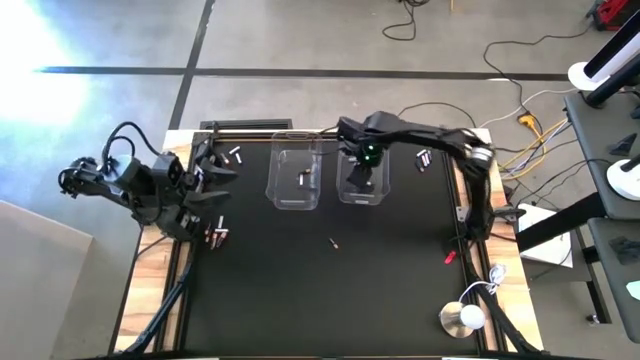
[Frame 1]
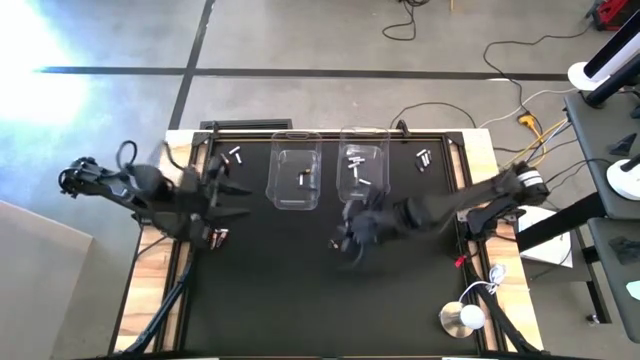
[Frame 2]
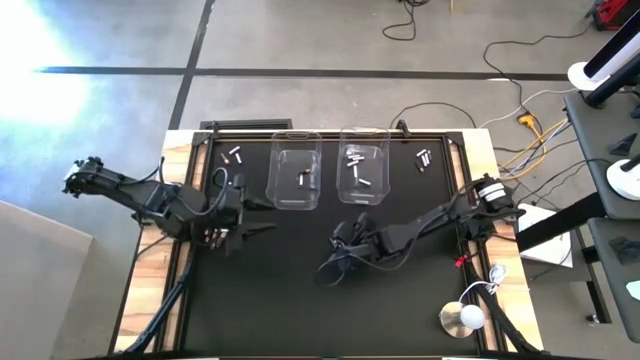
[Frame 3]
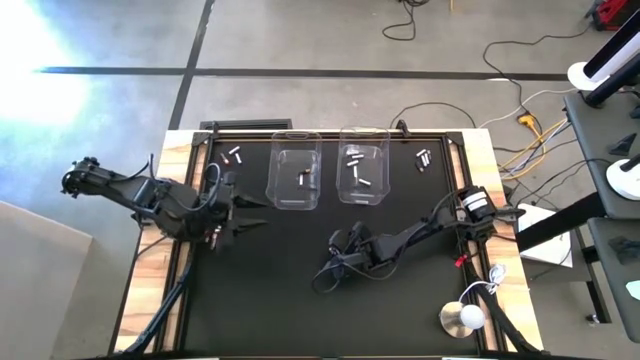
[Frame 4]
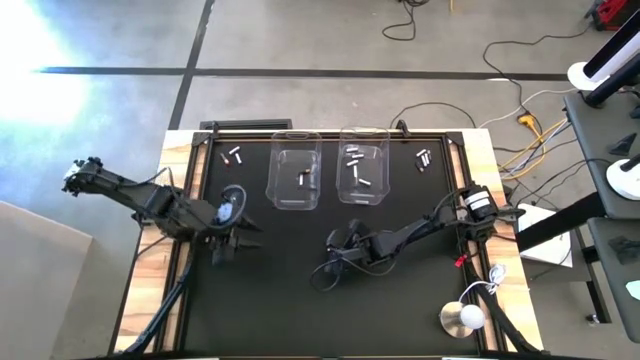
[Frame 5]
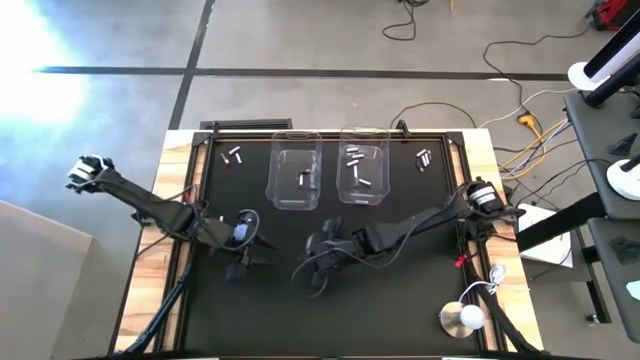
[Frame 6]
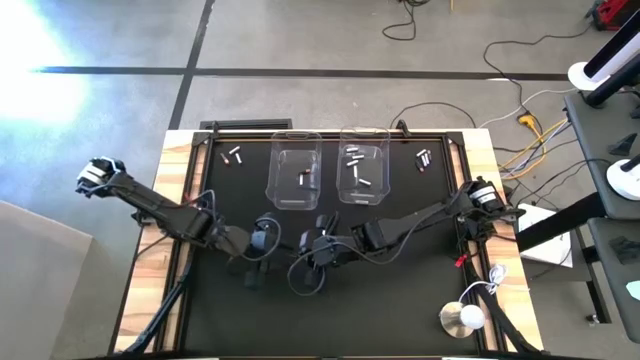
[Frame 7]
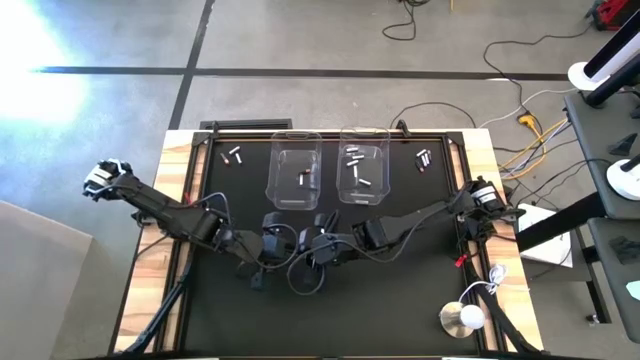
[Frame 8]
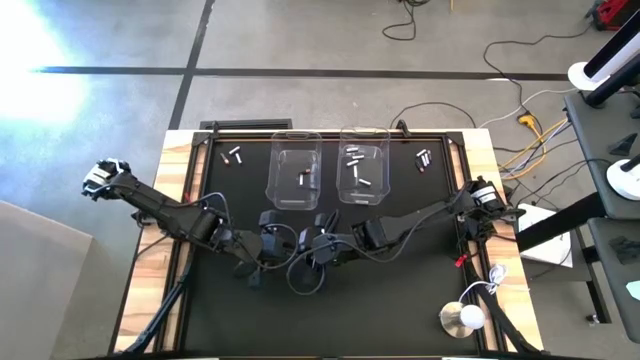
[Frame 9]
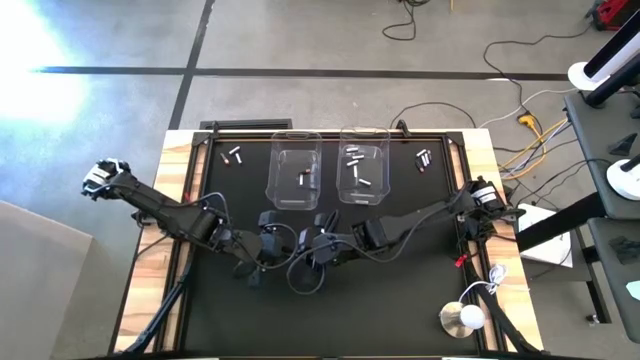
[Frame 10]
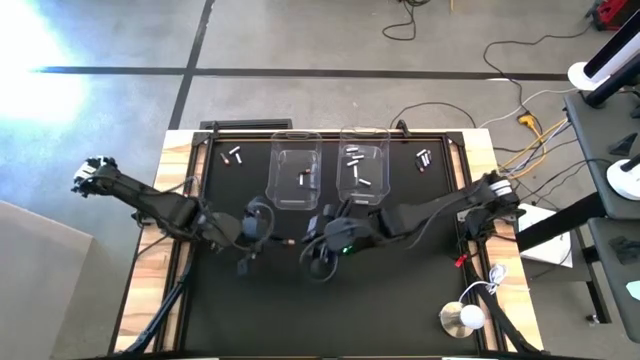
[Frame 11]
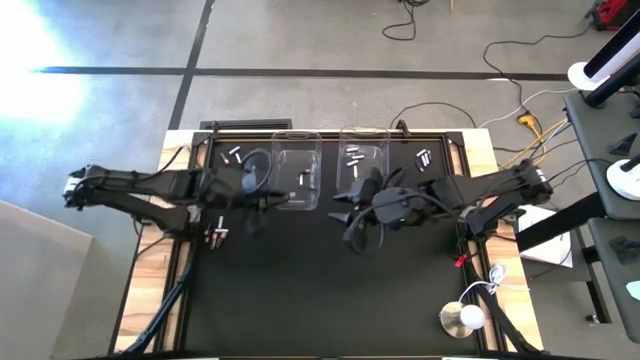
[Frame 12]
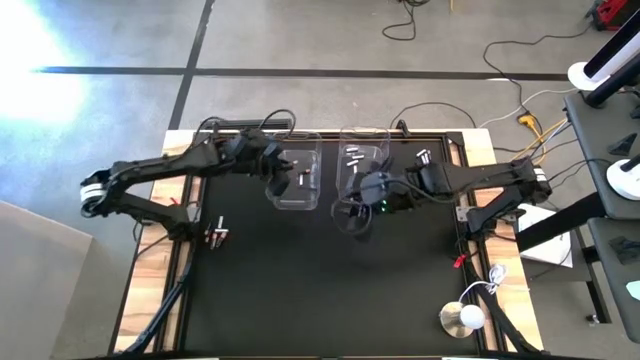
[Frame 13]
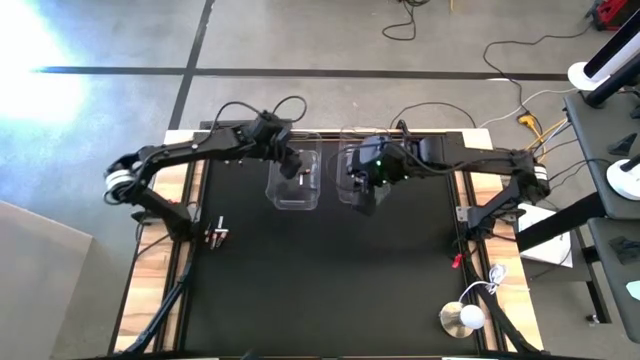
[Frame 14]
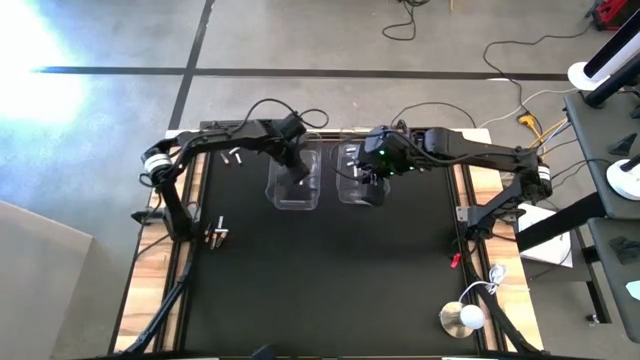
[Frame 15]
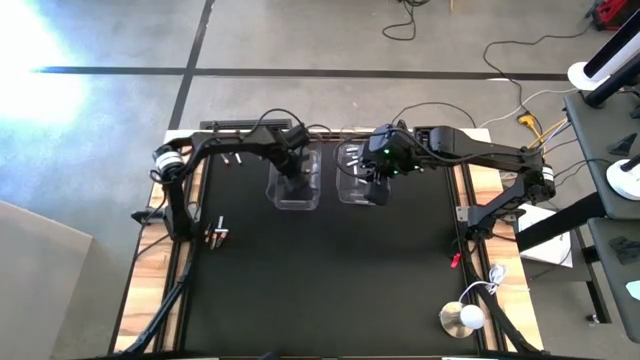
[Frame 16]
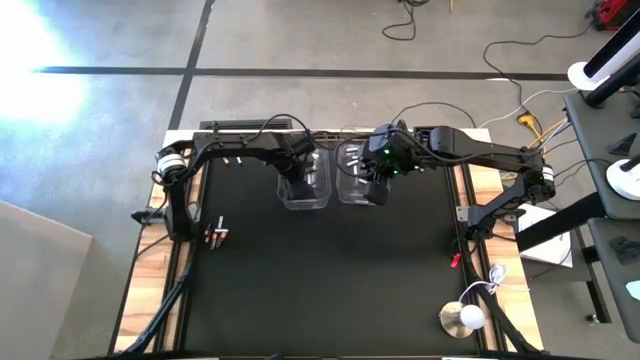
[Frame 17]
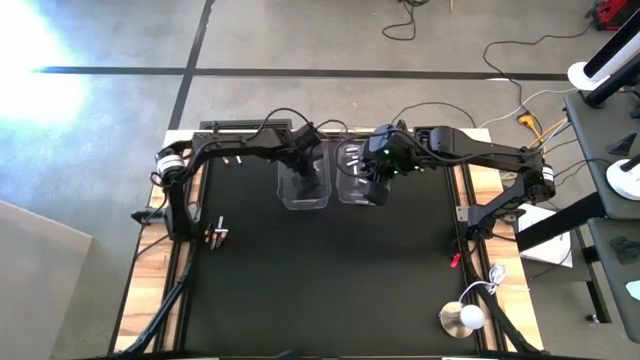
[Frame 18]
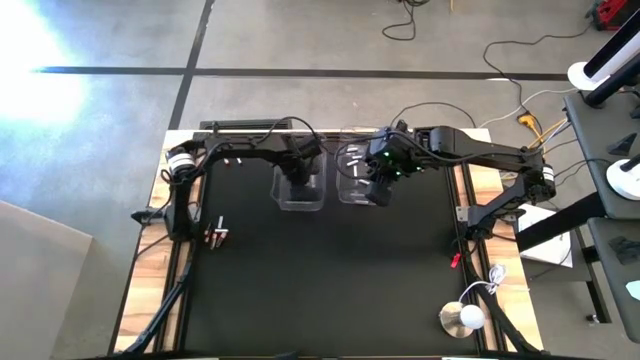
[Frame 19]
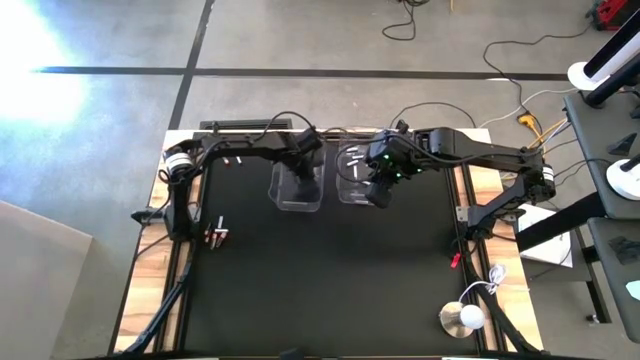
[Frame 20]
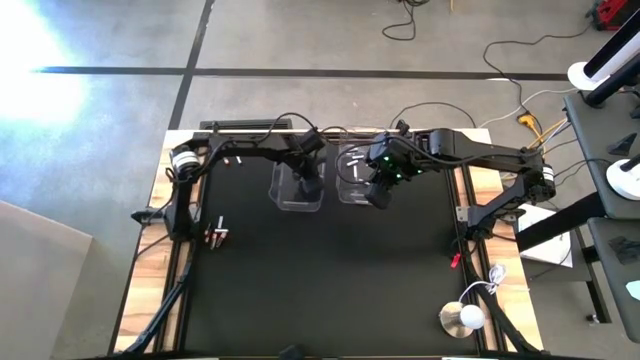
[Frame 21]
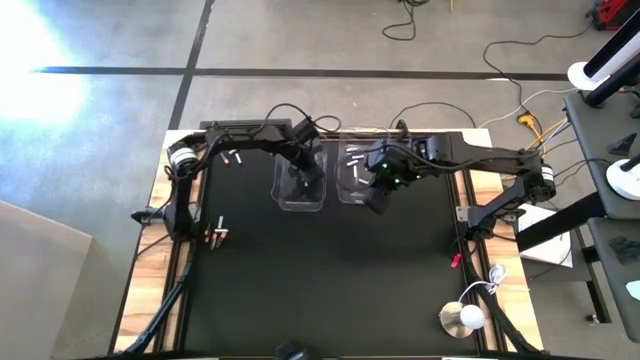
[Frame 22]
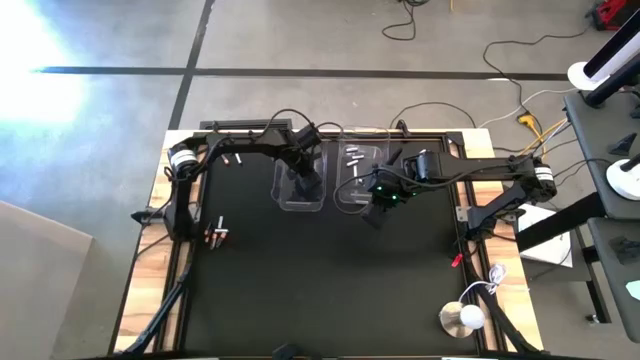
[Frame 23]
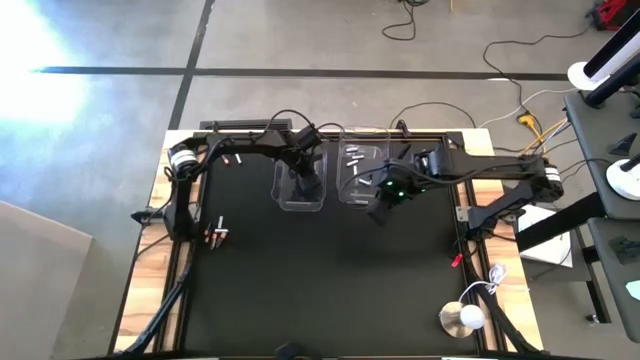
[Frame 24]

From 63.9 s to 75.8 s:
Task: Sort batteries
Put the black battery into the left transparent bin

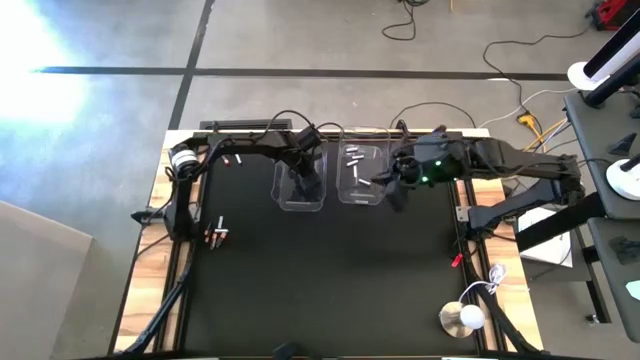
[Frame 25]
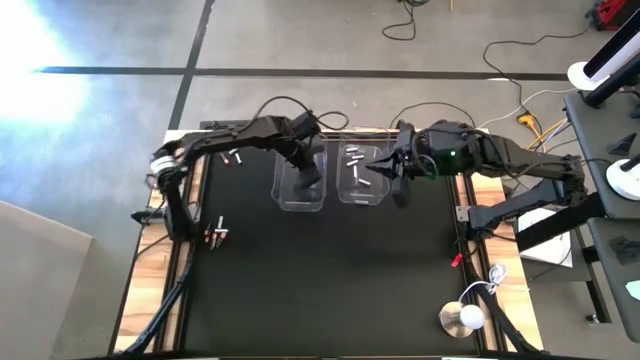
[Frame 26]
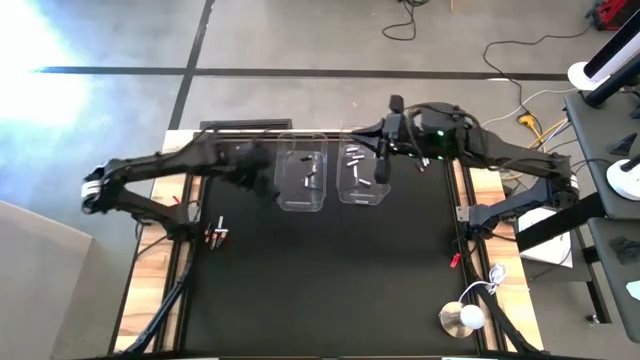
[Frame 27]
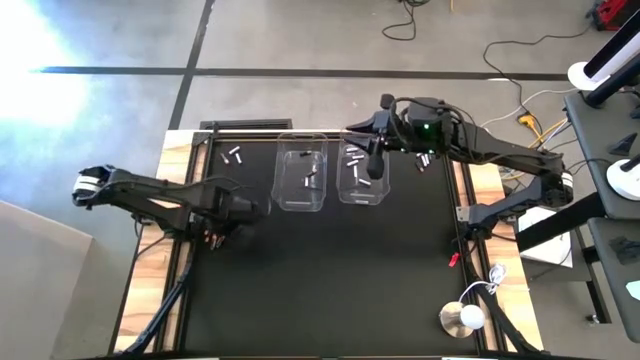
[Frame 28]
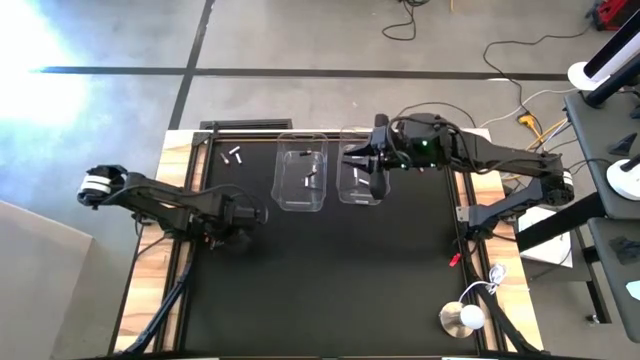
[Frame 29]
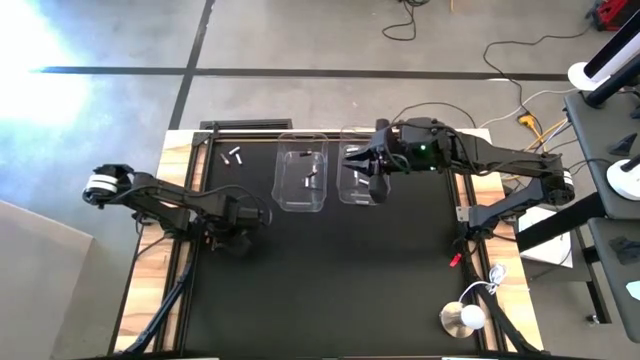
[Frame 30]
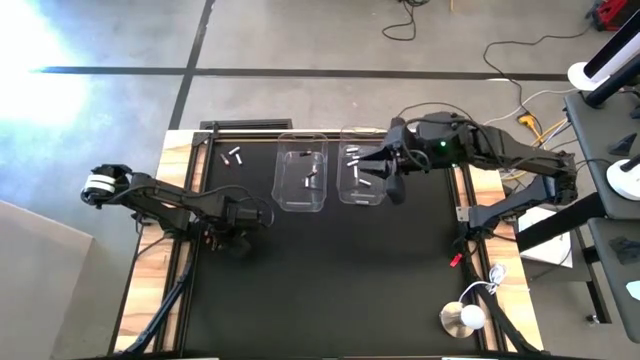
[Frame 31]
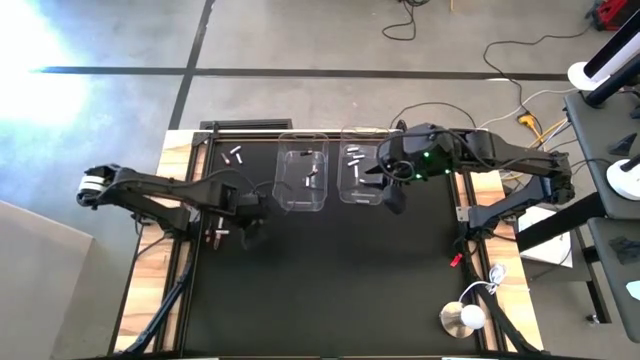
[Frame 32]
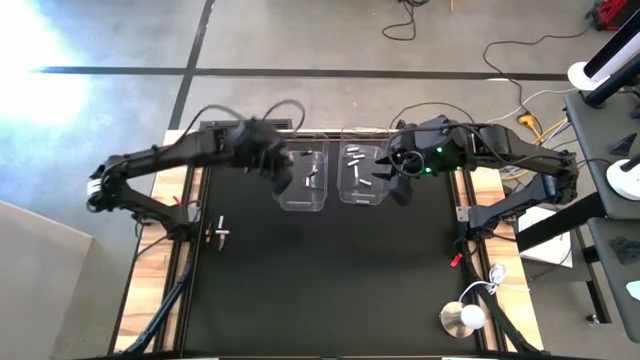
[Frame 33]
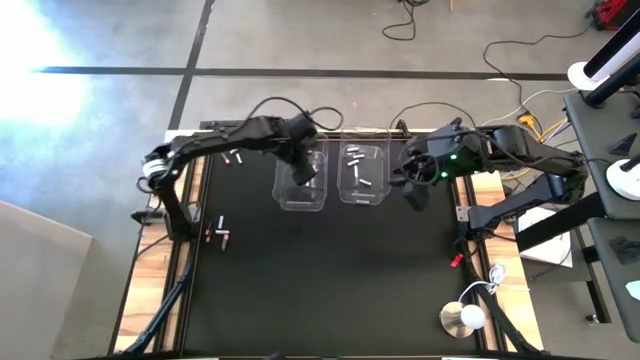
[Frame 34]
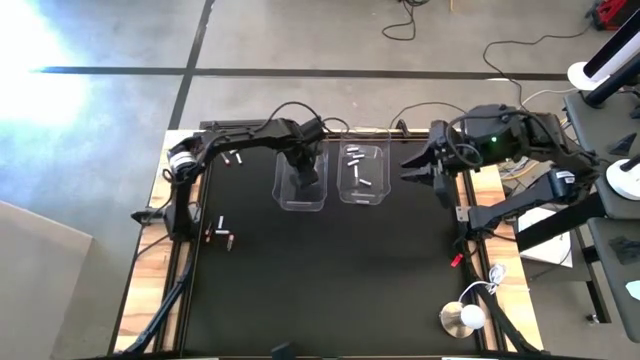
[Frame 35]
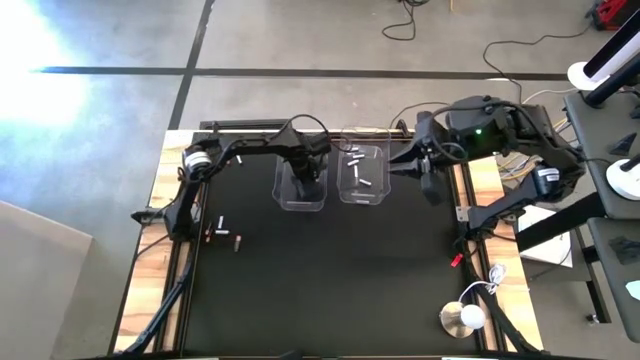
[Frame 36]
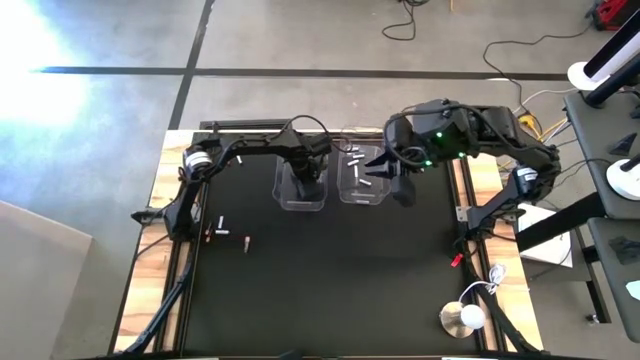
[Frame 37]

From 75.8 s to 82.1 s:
Put the black battery into the left transparent bin

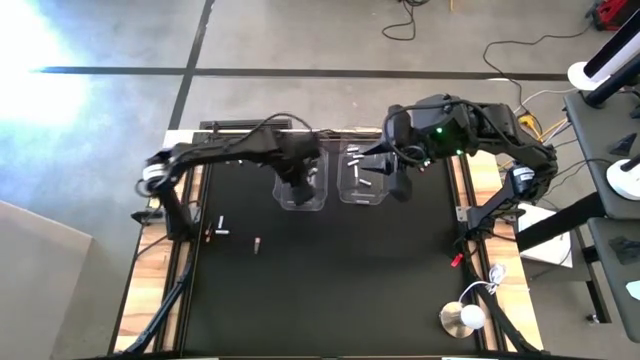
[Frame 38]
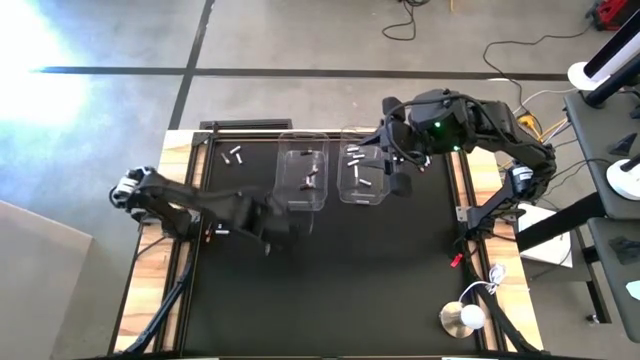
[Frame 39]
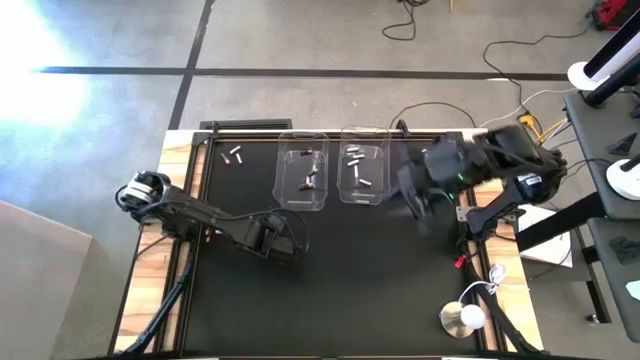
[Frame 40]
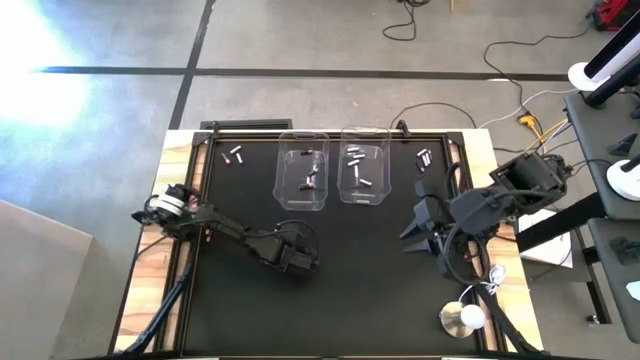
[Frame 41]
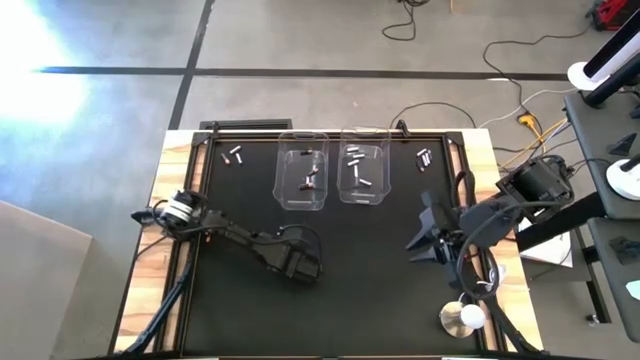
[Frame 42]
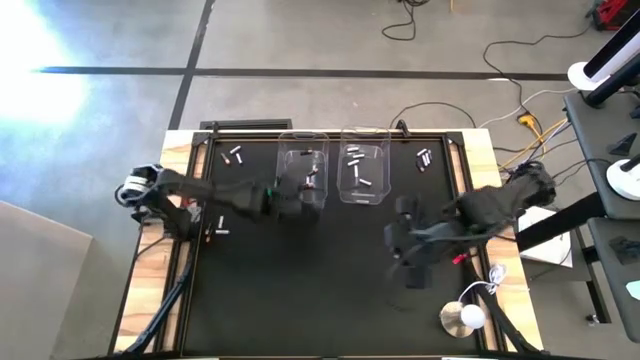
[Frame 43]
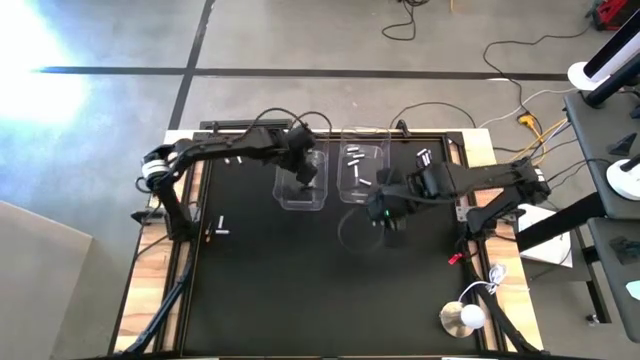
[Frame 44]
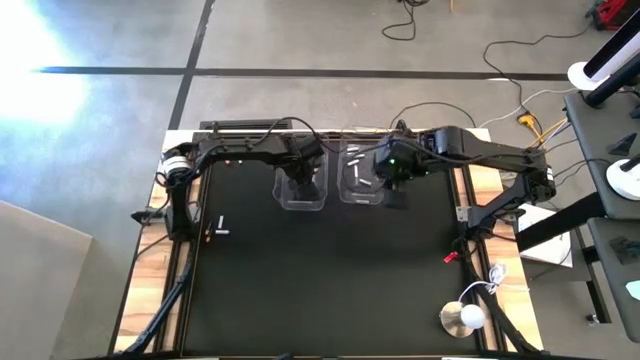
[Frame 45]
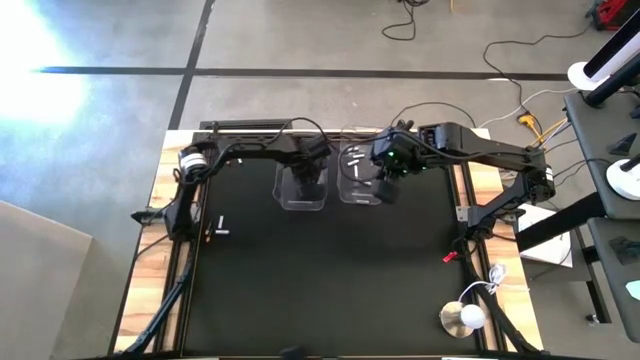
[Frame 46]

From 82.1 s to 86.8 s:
Put the black battery into the left transparent bin
